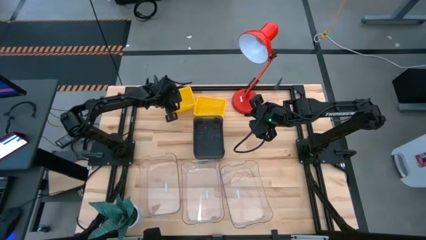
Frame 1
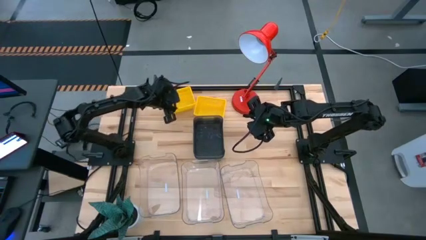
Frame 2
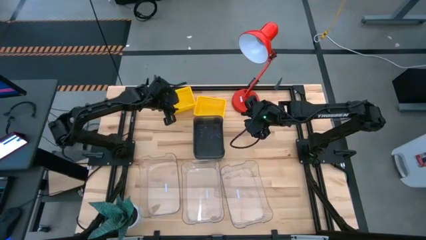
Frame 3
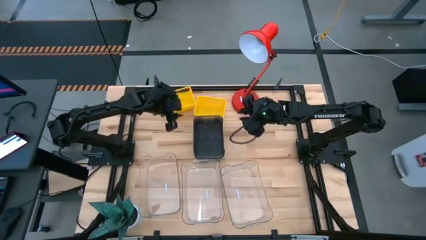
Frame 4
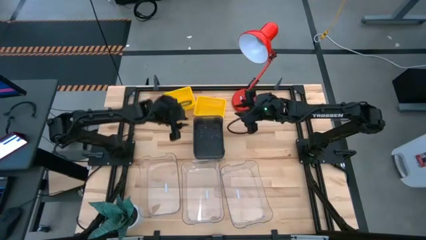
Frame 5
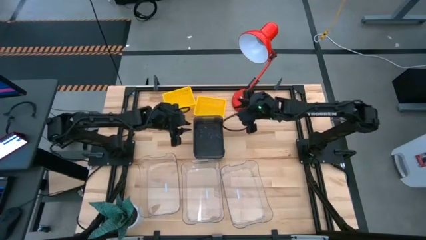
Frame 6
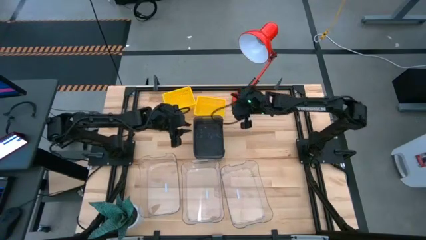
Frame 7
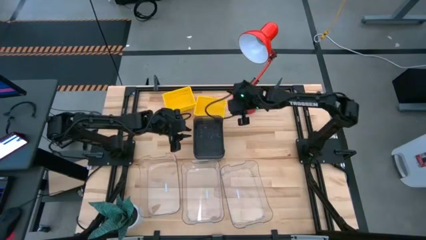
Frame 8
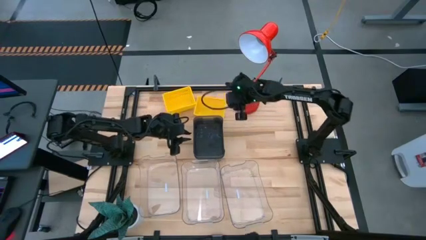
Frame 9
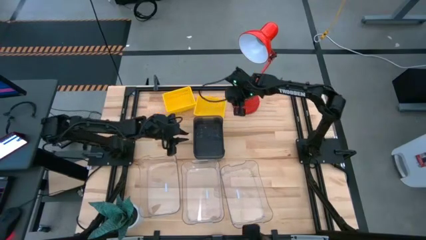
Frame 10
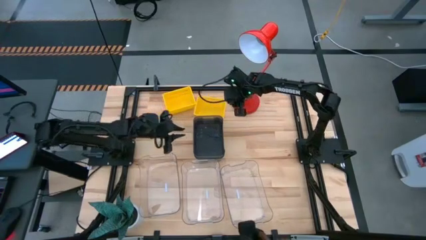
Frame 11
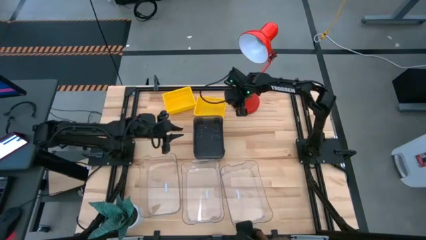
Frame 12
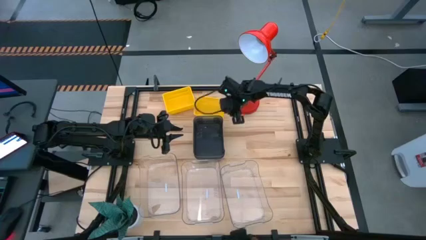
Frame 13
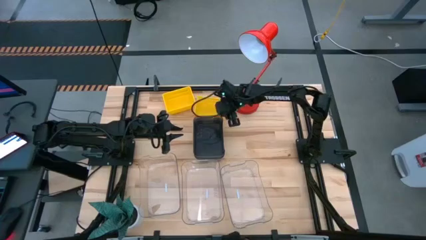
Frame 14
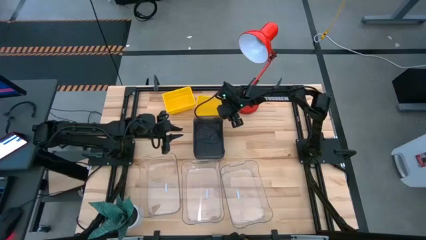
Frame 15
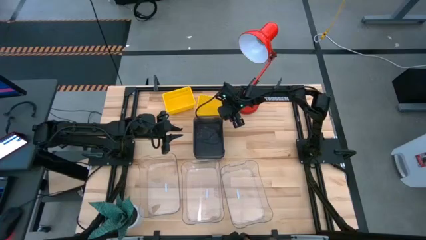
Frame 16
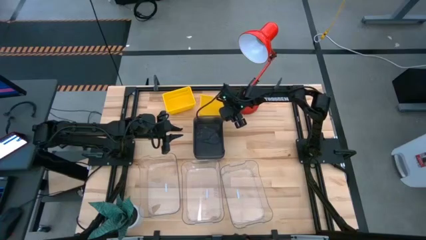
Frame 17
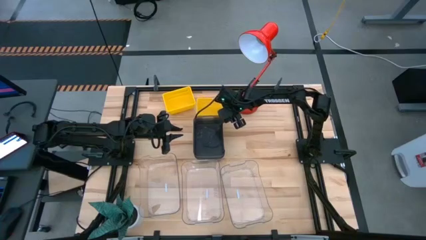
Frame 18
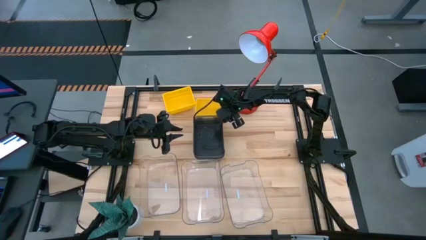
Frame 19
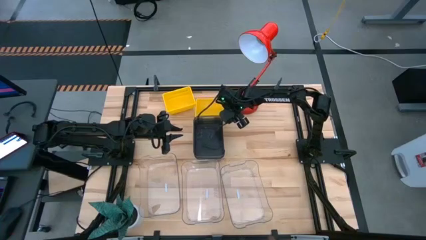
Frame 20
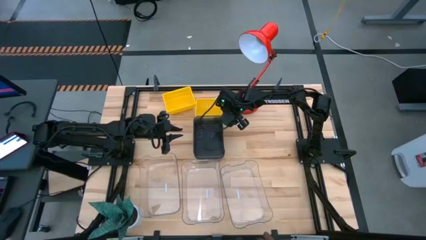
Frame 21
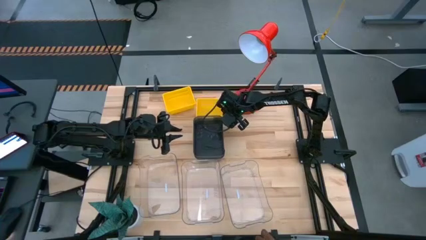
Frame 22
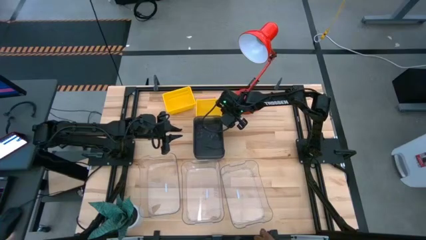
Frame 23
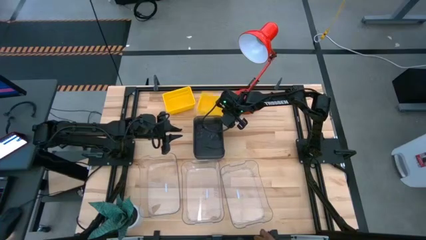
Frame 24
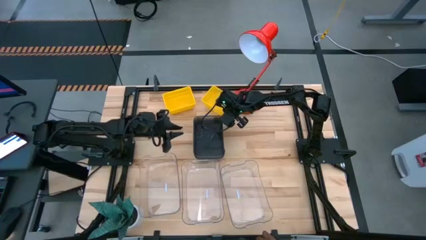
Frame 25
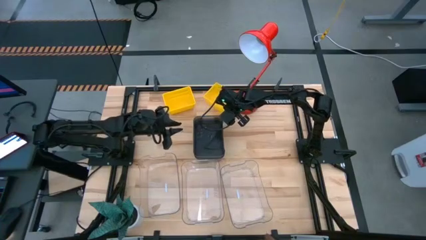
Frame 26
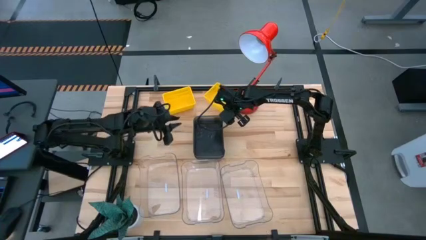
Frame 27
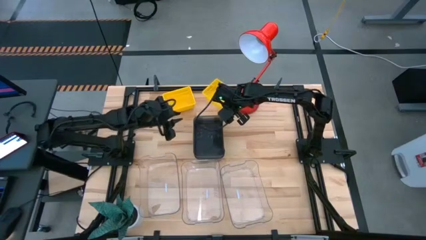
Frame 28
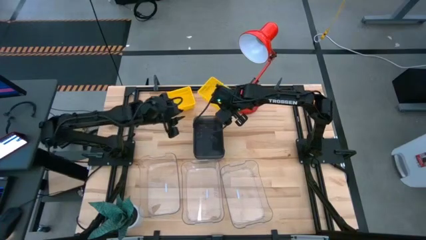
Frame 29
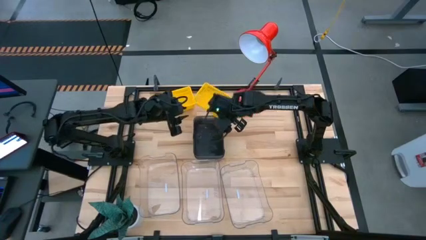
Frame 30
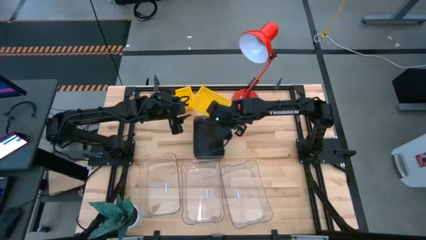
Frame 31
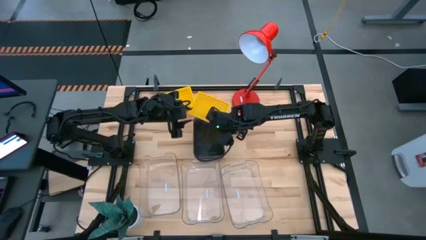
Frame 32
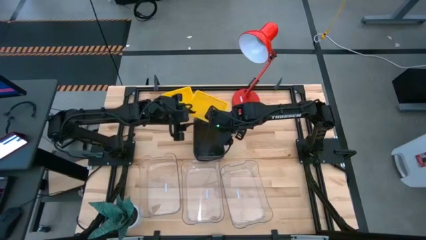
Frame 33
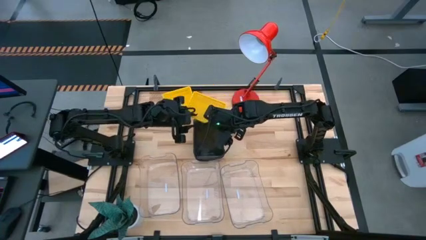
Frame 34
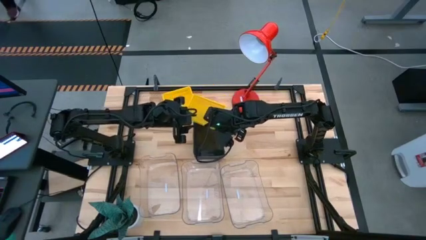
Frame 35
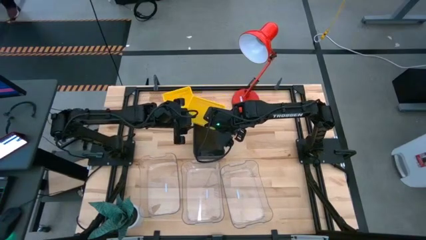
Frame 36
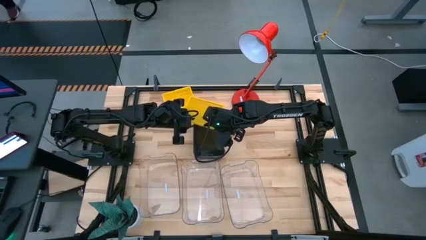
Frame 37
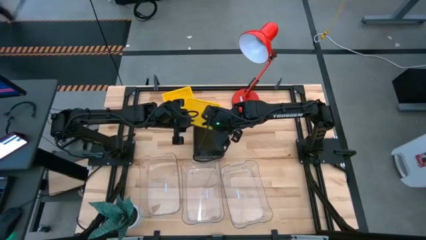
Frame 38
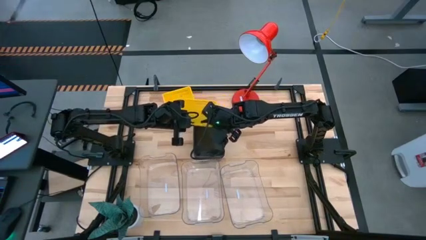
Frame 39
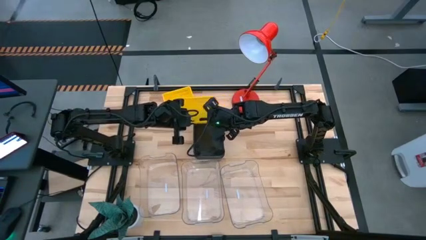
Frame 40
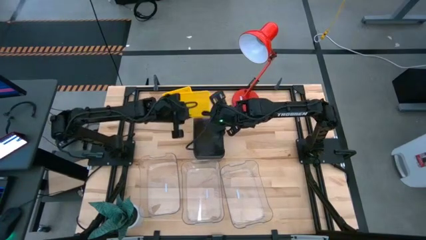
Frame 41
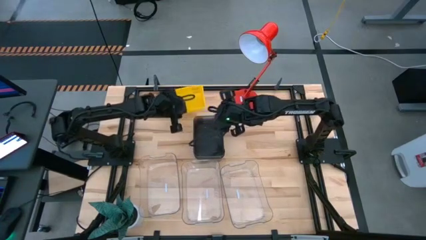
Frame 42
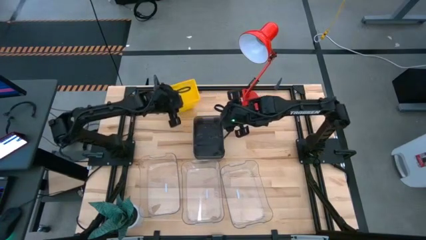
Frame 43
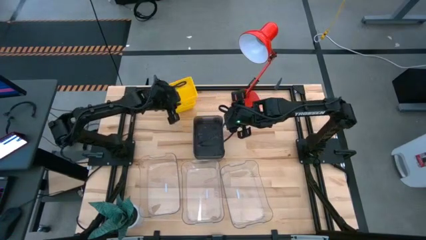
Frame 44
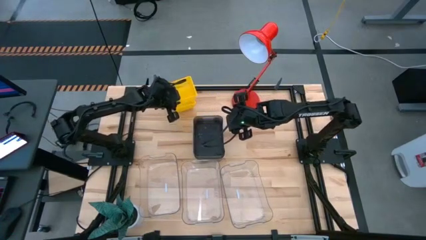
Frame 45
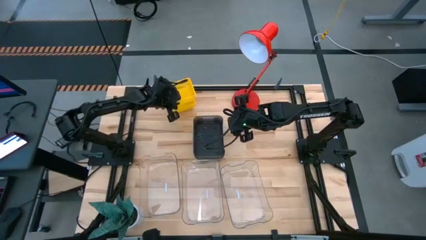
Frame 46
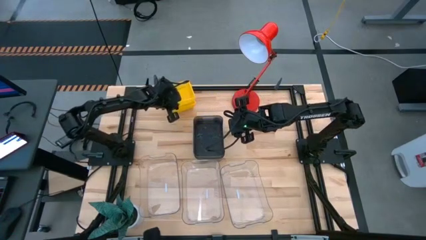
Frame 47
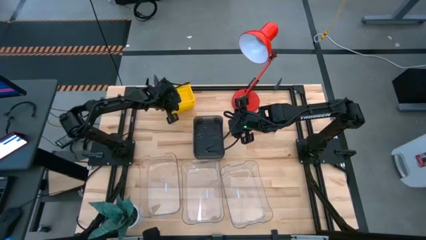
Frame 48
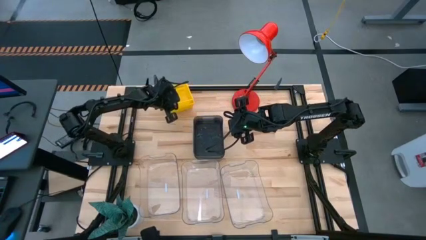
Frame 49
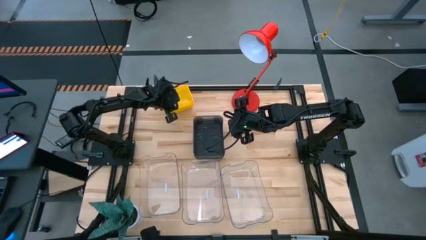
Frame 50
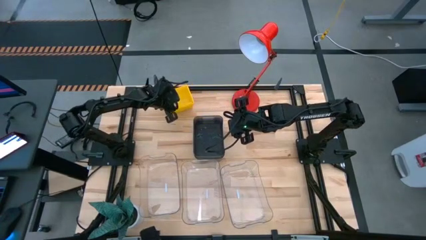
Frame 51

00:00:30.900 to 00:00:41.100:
Stack the right yellow bin on top of the left yellow bins

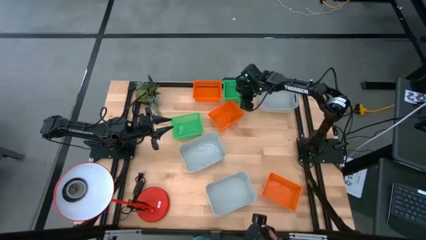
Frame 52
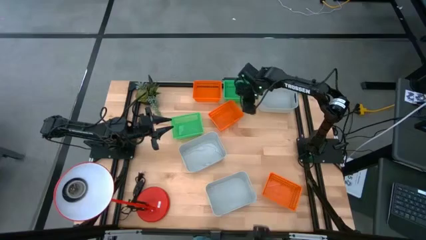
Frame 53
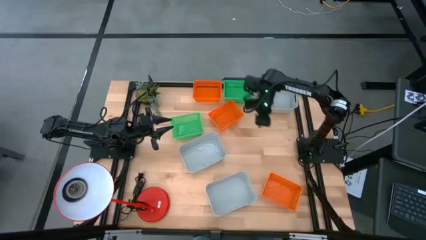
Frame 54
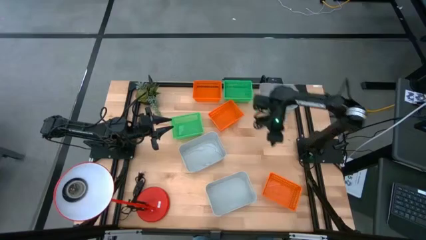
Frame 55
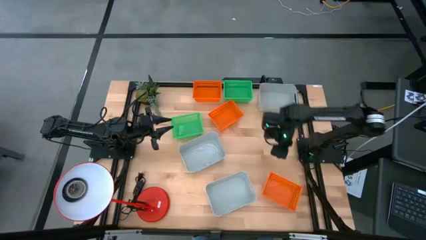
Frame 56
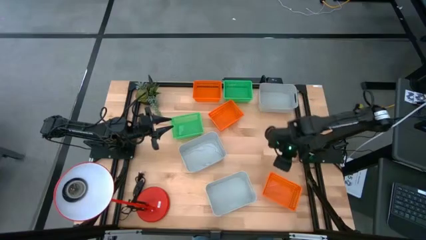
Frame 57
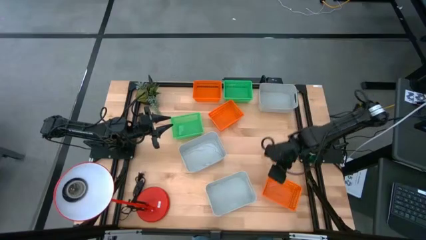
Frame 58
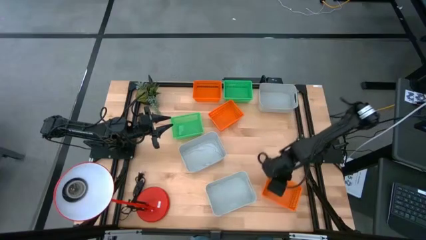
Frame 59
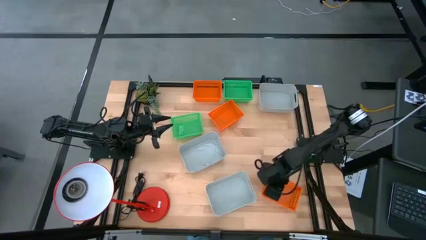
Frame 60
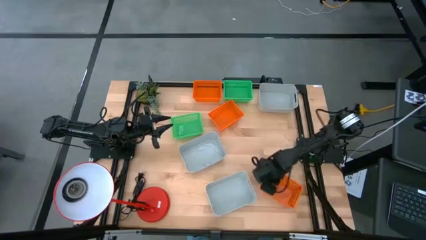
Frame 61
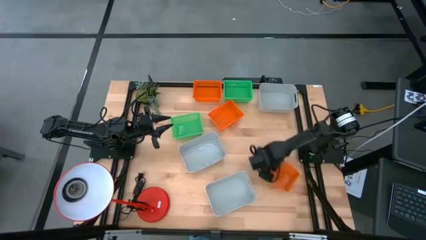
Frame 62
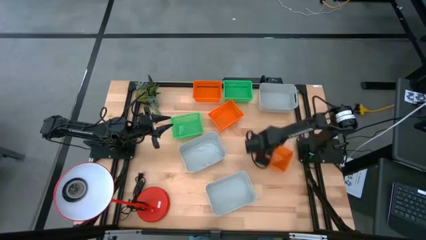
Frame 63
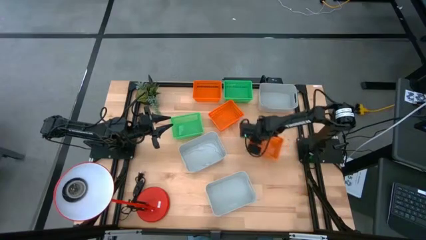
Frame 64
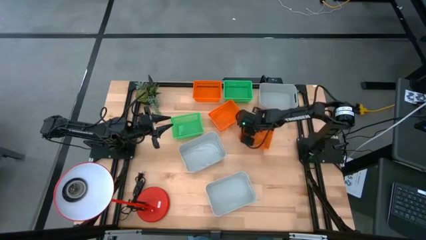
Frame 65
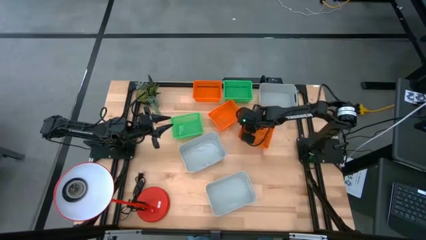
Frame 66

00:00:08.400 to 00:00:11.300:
Move the bottom orange bin to the middle right of the table

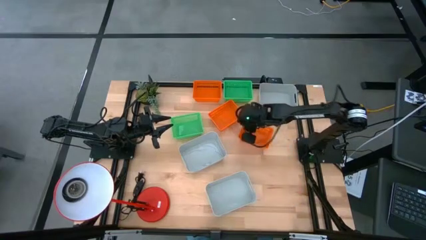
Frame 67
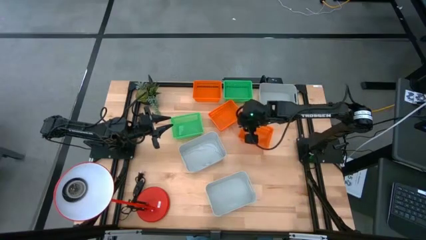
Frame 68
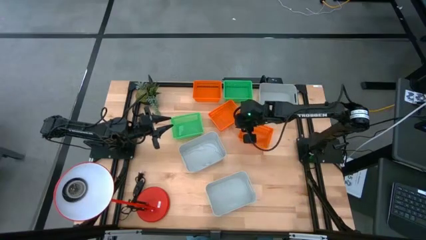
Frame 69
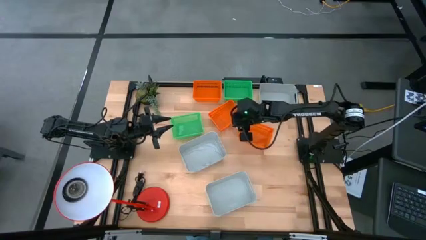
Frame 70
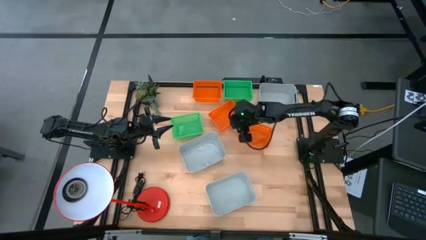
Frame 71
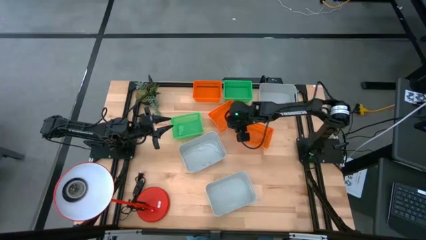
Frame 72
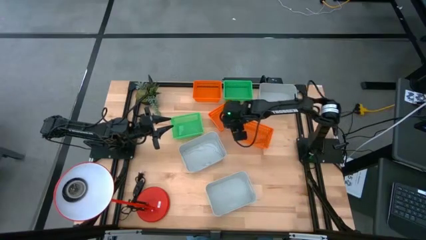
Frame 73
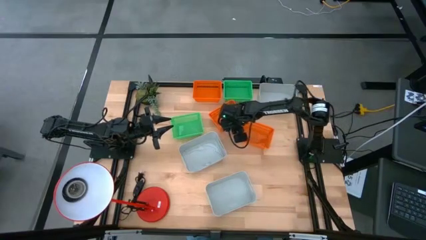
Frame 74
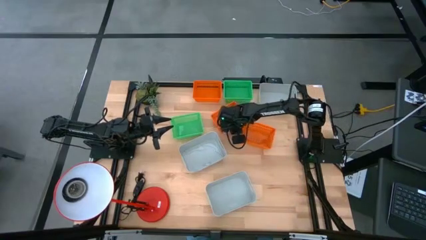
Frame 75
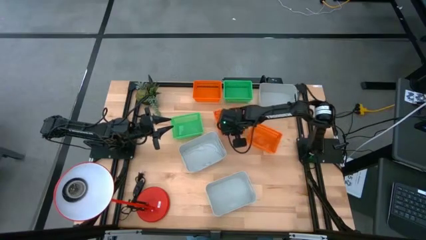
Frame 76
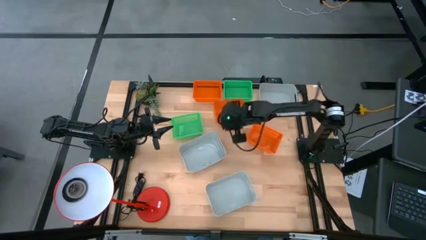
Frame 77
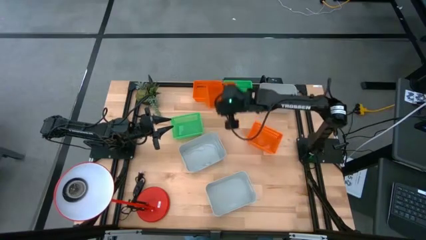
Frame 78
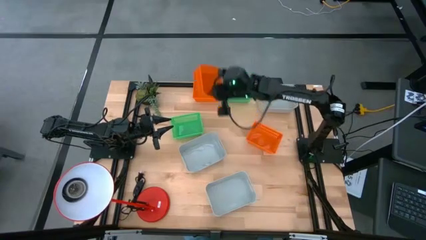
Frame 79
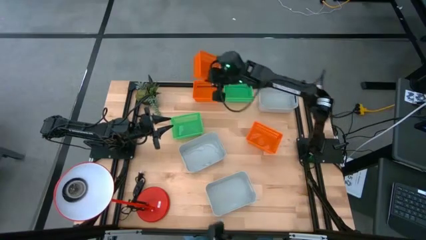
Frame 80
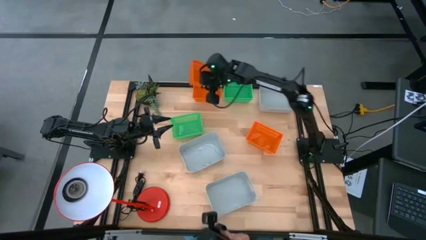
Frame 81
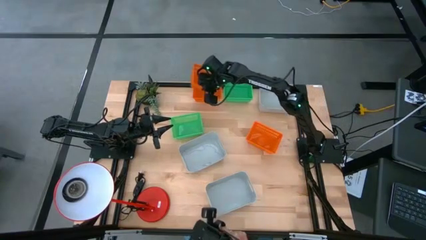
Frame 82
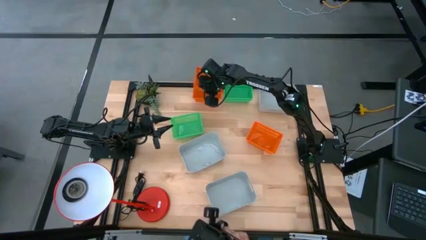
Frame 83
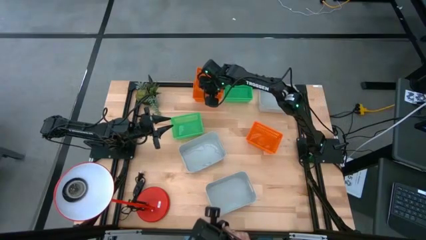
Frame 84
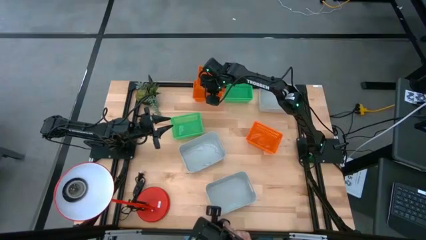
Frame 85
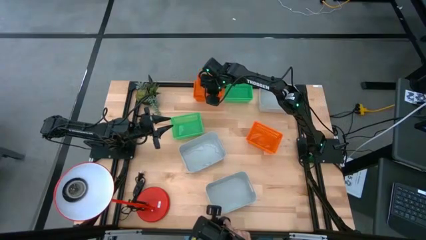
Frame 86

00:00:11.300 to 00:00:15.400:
Stack the middle orange bin on the top orange bin
